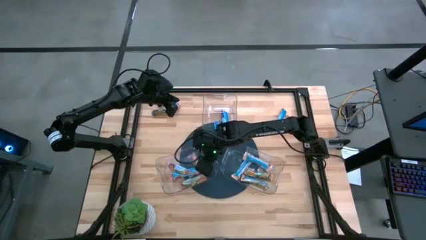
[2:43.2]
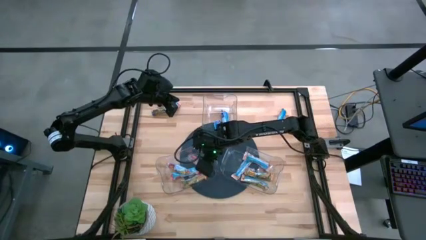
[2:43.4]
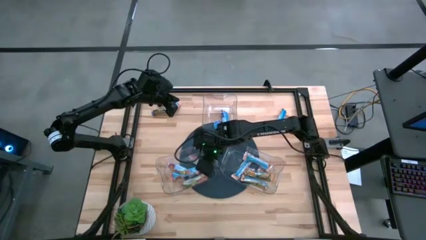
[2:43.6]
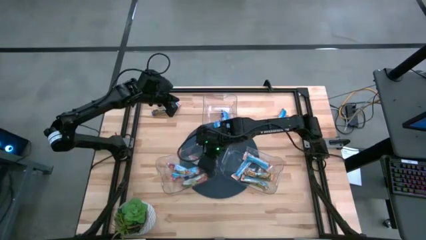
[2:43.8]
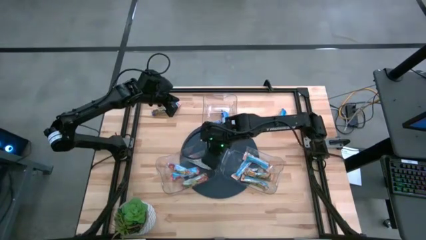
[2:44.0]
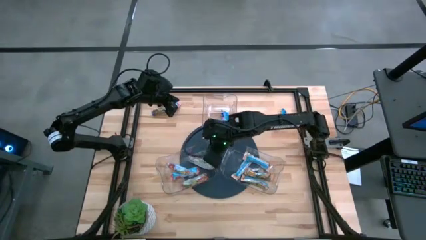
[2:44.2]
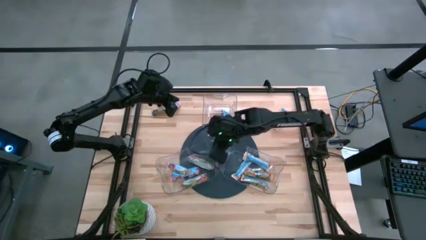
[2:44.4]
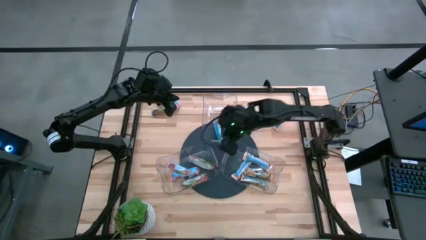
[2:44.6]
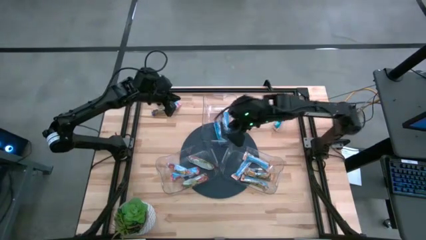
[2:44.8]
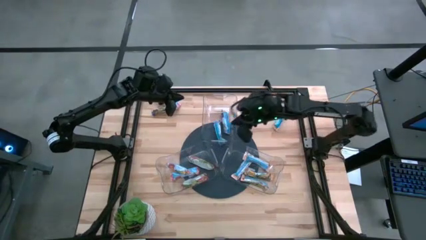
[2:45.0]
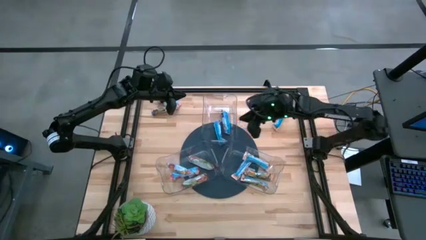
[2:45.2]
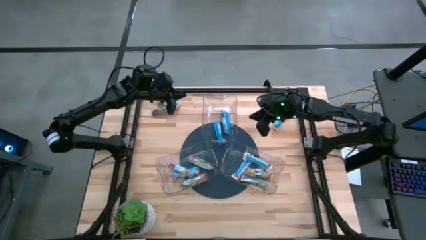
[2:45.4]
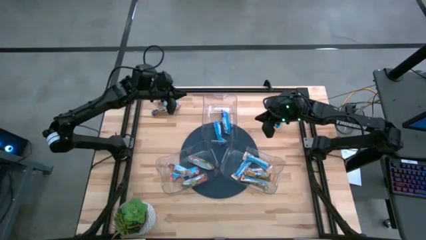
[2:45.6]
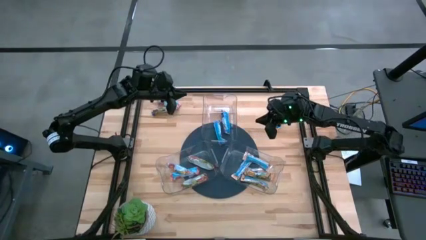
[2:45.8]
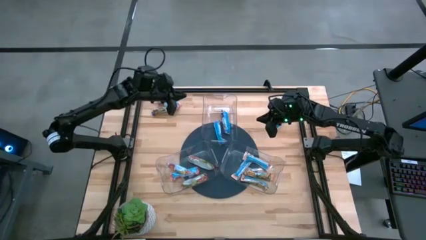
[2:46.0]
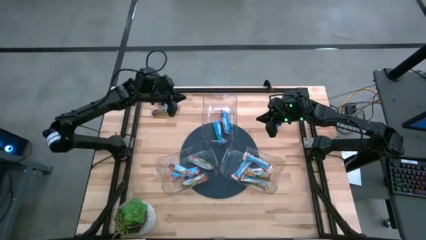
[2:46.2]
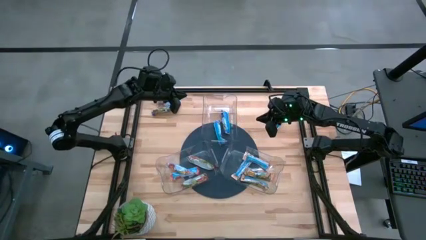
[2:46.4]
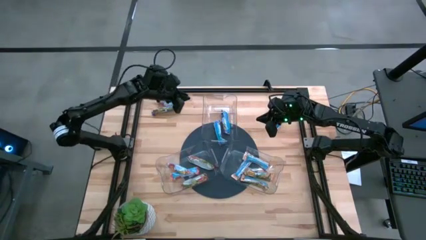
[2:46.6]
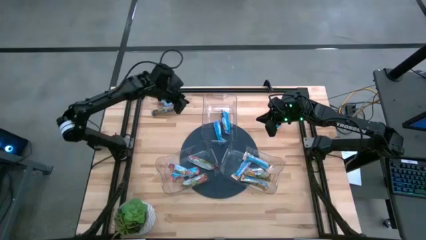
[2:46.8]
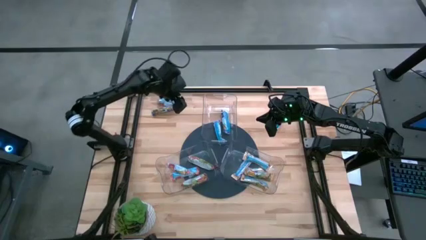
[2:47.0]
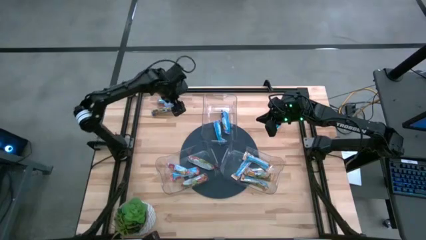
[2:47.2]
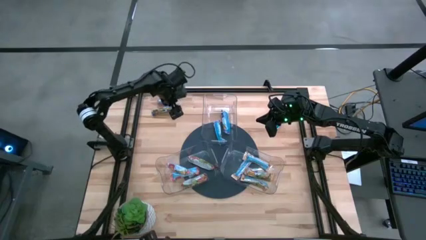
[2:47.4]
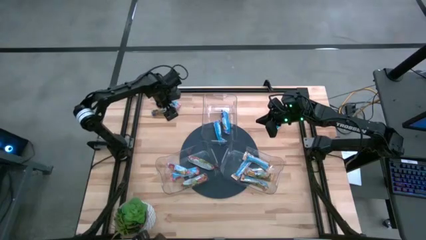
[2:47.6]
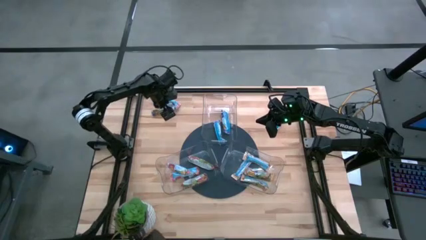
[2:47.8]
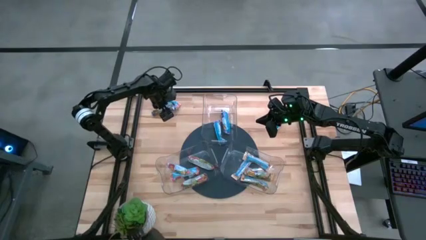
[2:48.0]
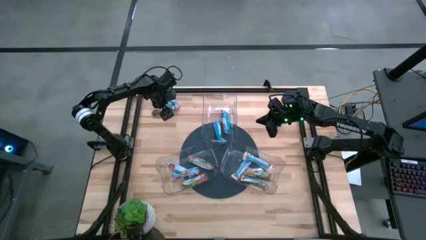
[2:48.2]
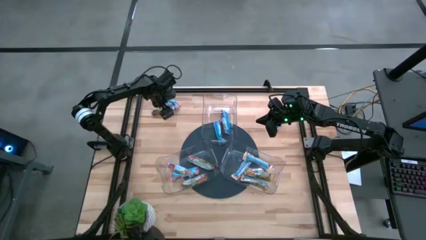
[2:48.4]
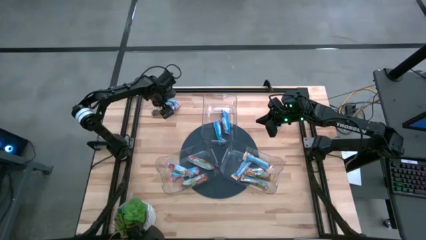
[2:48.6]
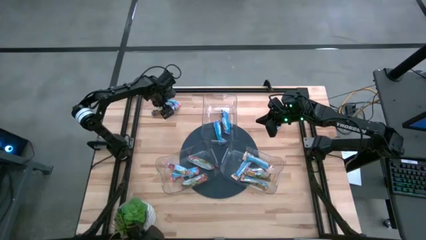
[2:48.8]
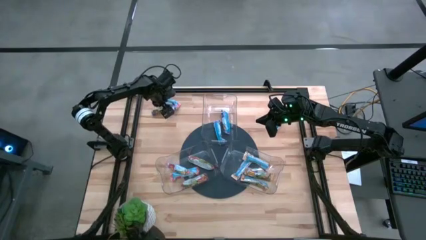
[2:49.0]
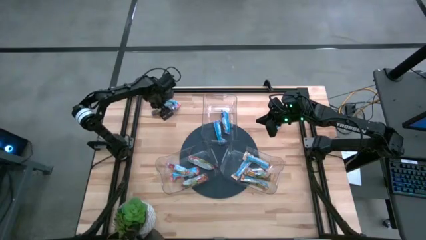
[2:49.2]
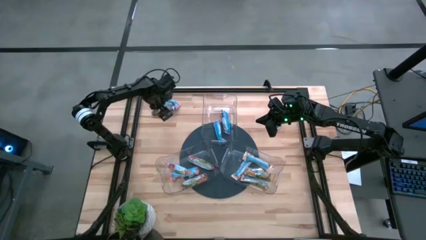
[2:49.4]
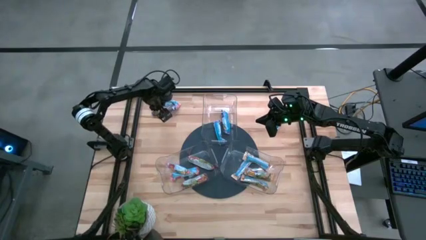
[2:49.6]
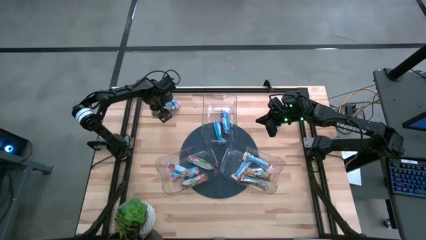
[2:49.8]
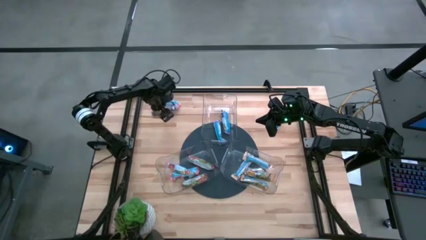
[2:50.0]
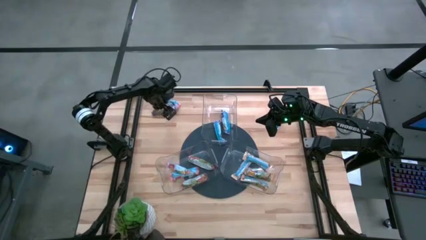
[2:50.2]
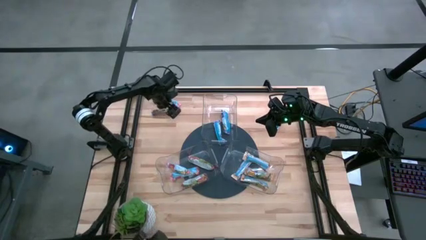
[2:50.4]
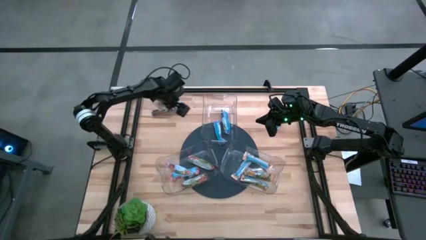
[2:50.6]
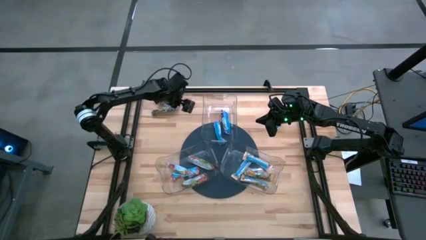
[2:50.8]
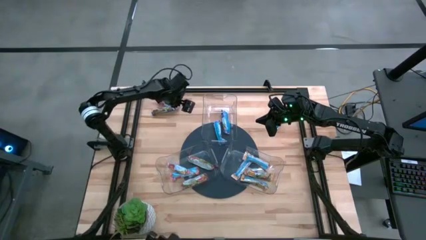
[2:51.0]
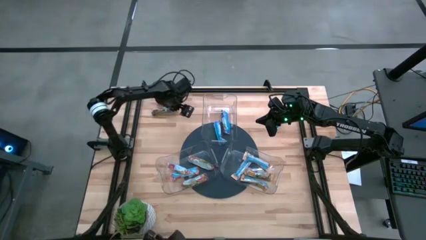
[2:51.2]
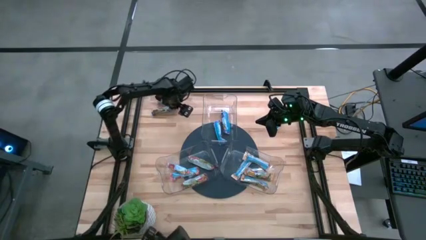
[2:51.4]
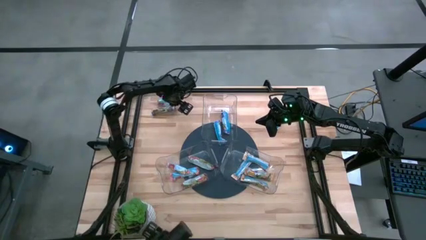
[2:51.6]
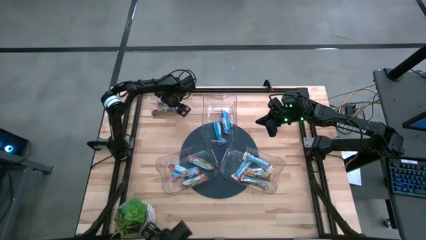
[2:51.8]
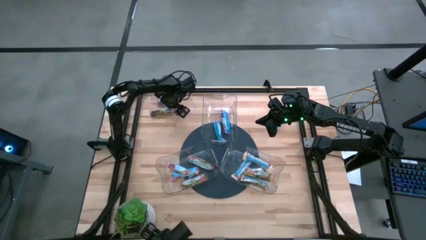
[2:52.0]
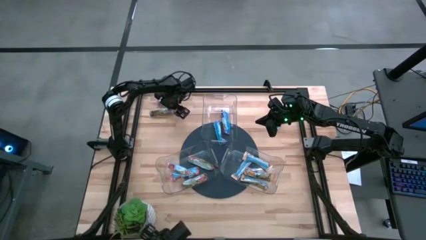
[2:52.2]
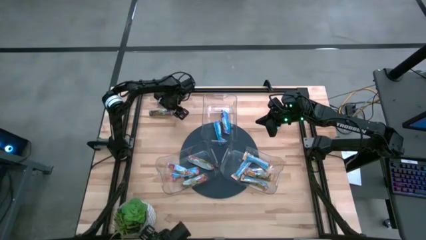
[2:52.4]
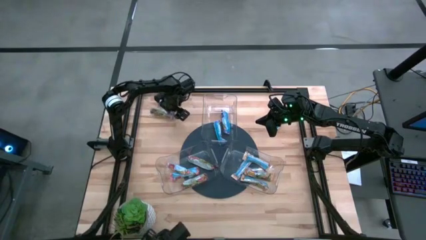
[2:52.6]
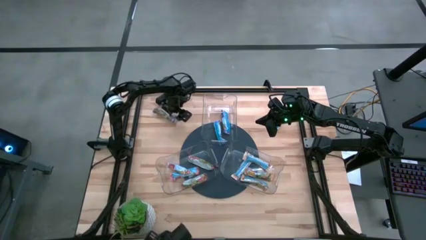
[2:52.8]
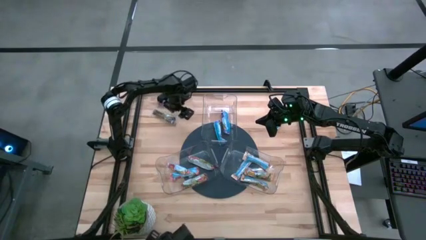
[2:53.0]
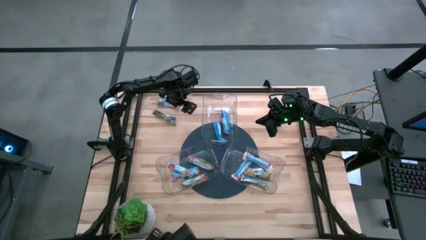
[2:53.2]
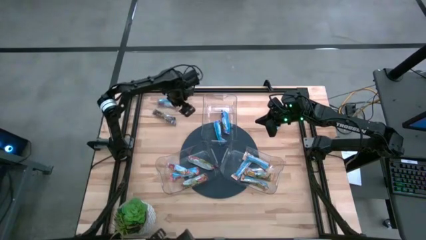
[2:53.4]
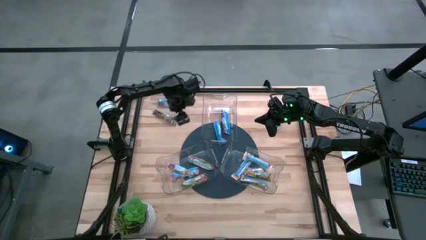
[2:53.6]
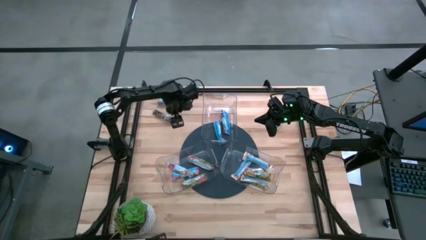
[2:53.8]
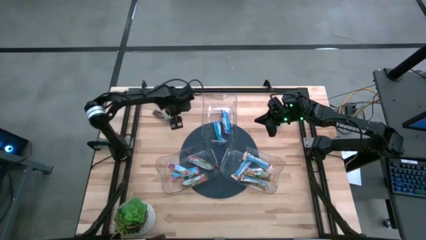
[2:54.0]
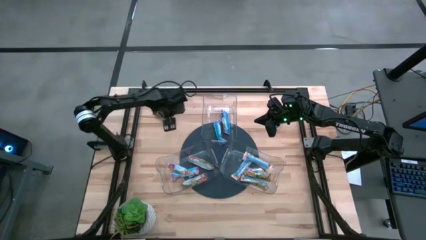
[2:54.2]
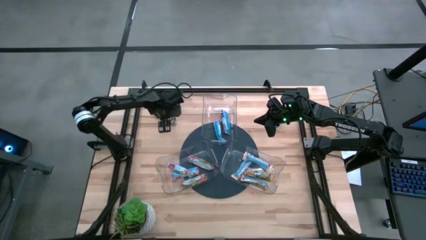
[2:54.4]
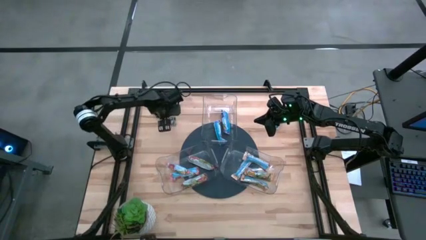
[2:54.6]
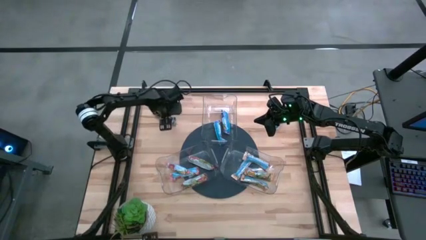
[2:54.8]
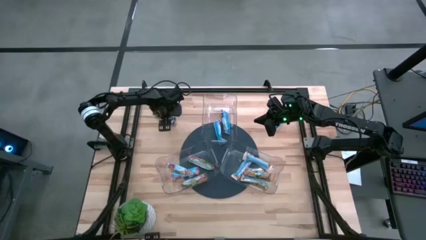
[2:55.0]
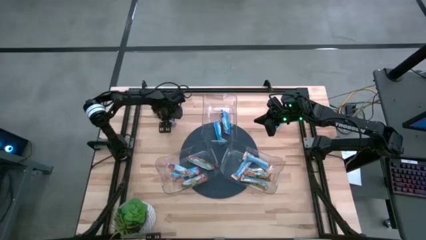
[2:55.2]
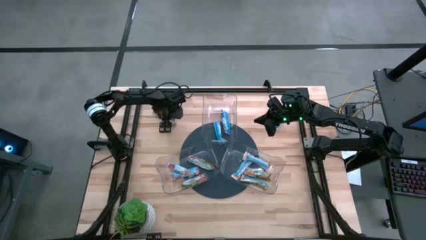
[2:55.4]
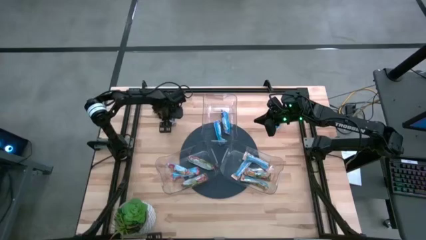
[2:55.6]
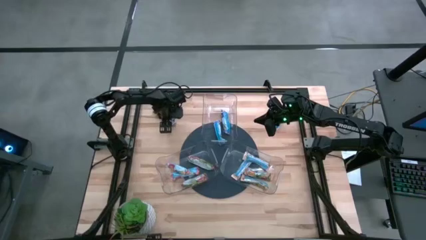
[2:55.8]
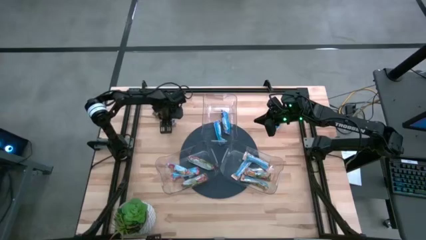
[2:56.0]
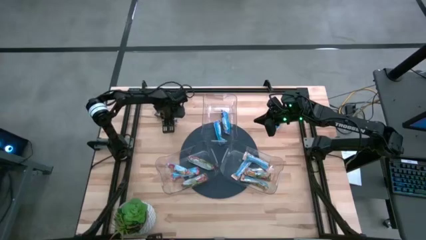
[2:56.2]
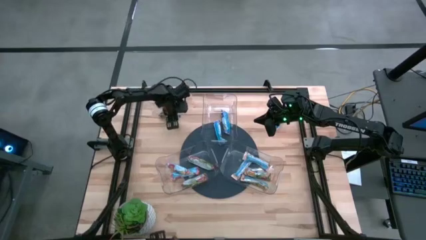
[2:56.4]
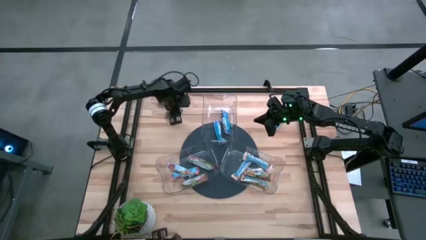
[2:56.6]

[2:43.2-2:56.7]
Task: Pick and place Granola Bars by type
Put the blue snack into the top transparent bin

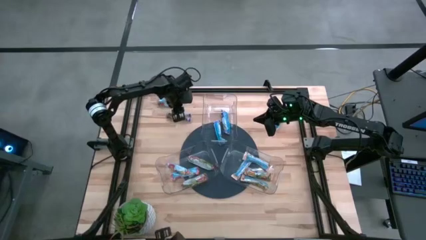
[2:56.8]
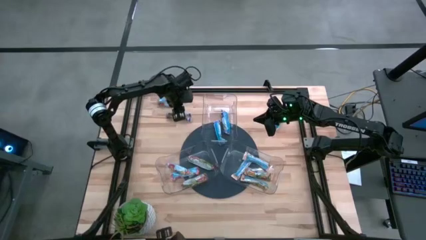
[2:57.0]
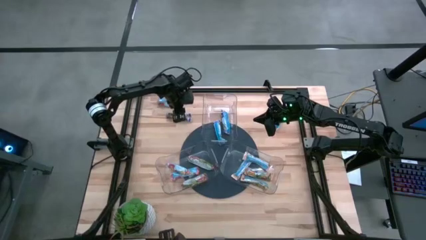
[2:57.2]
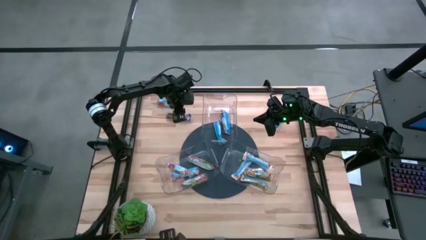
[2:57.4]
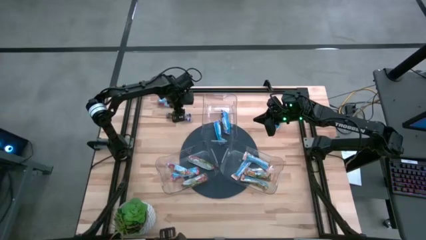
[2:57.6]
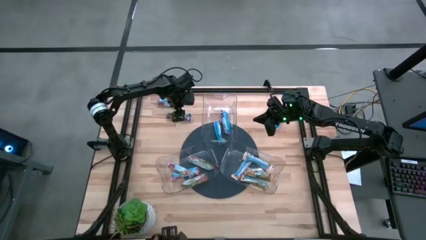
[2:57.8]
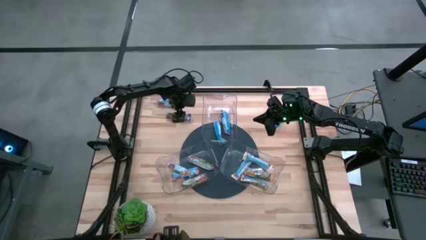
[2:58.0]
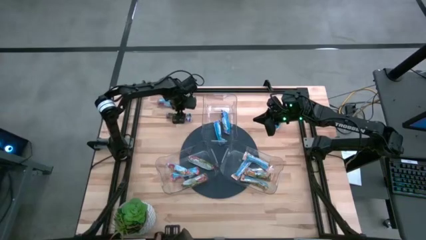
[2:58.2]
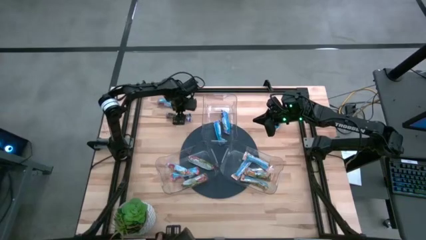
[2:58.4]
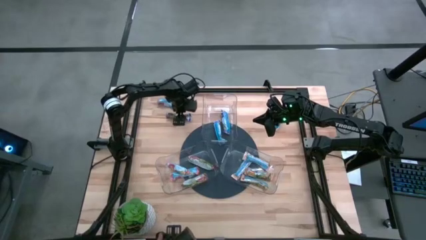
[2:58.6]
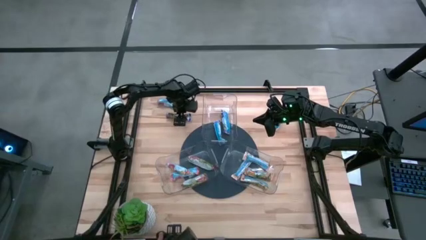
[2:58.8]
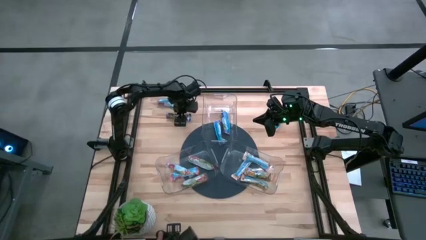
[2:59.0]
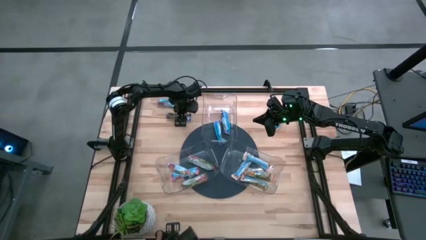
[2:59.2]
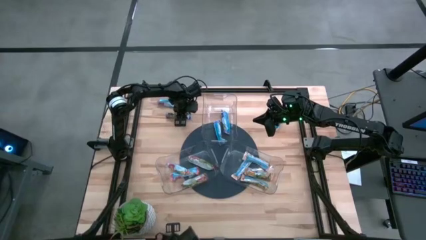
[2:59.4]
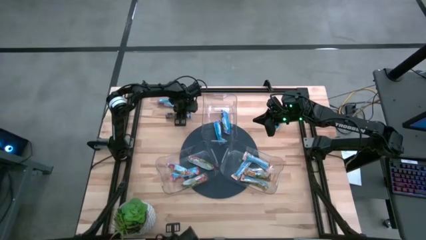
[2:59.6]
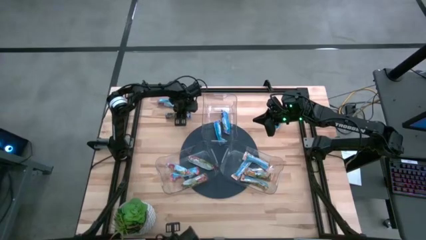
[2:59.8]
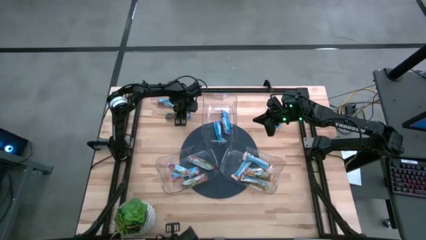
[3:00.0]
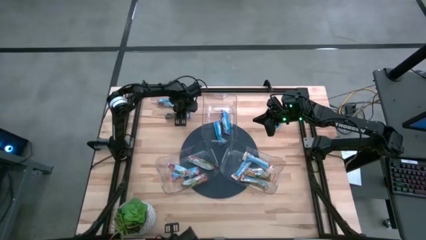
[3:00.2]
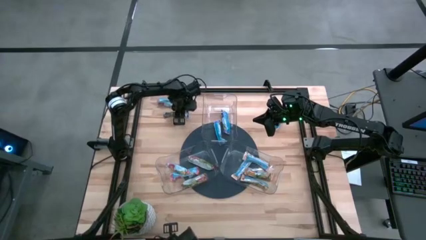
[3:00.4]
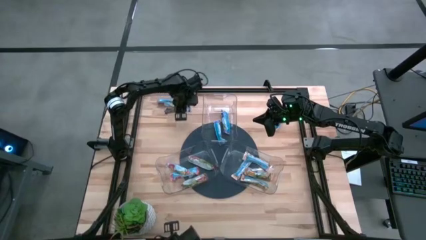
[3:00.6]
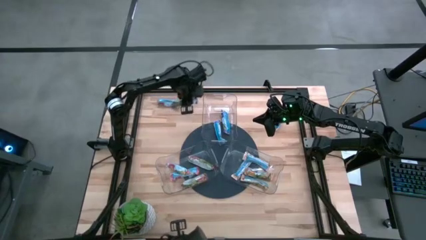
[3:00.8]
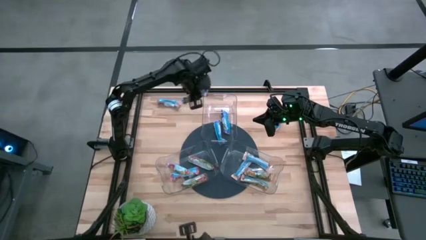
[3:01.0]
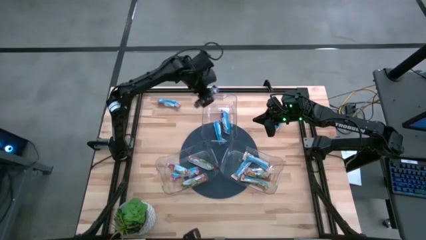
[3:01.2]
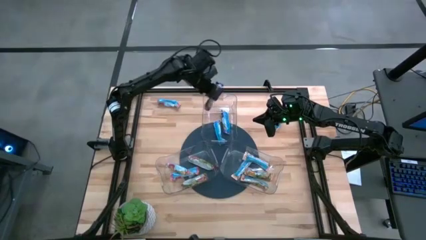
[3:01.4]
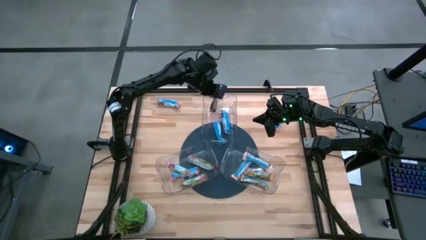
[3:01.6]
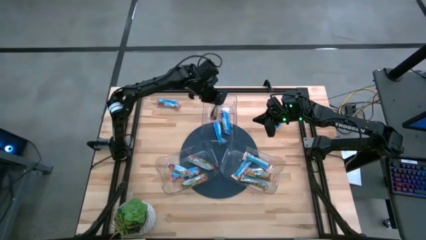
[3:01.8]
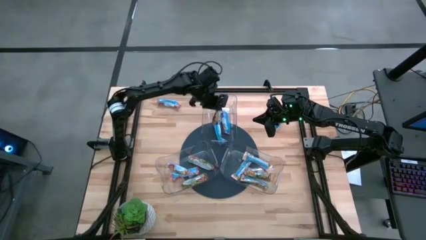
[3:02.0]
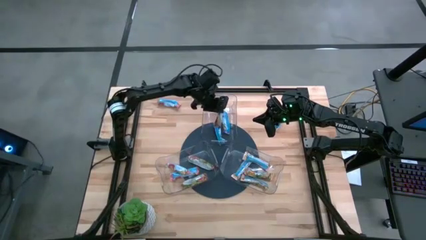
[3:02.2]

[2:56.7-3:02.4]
Put the blue snack into the top transparent bin
